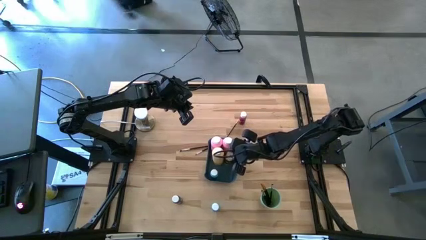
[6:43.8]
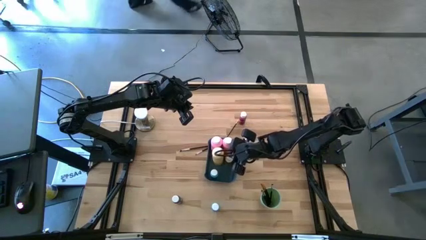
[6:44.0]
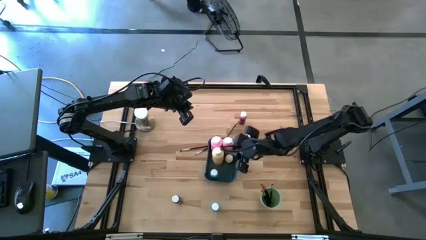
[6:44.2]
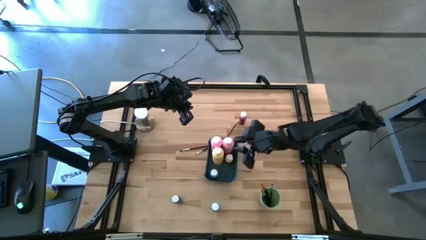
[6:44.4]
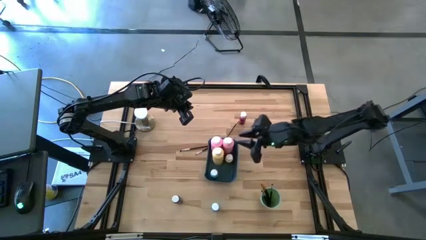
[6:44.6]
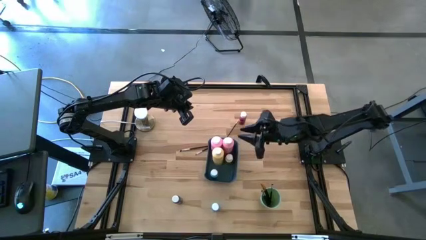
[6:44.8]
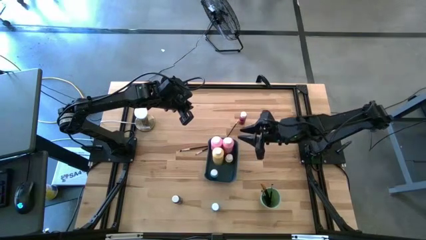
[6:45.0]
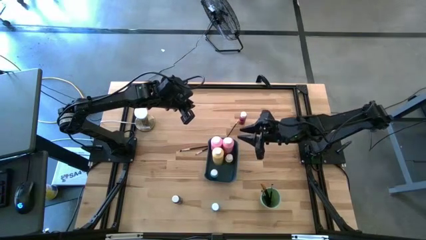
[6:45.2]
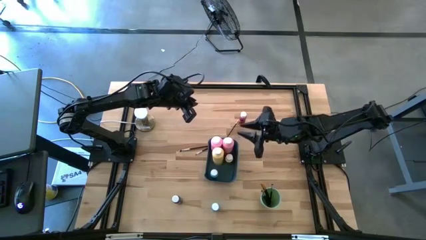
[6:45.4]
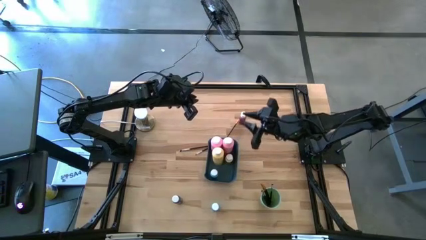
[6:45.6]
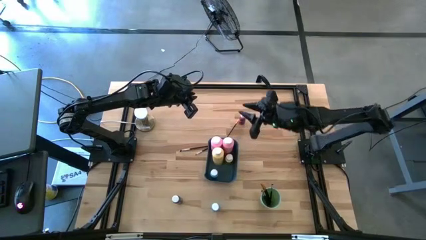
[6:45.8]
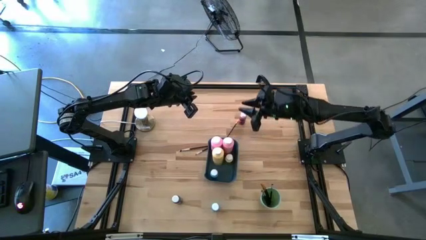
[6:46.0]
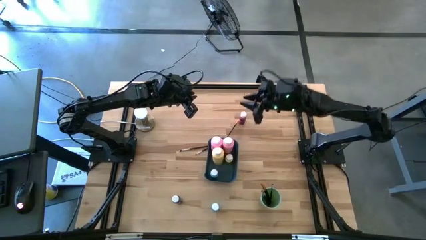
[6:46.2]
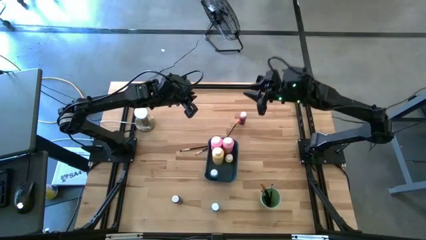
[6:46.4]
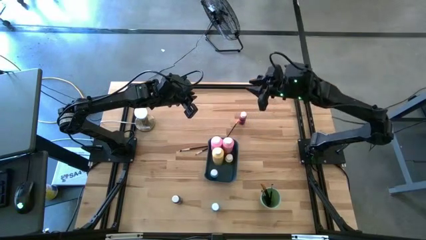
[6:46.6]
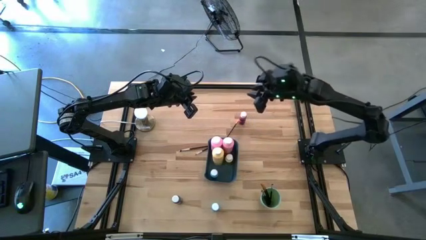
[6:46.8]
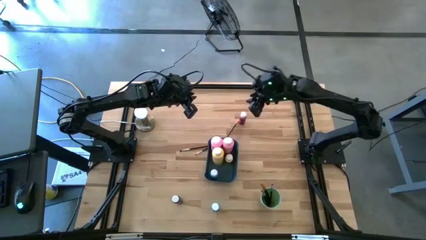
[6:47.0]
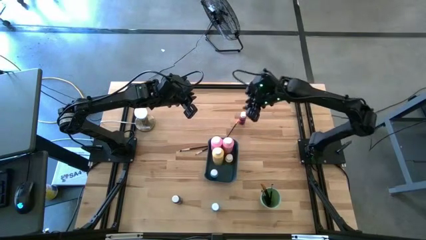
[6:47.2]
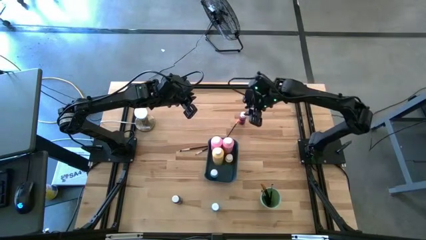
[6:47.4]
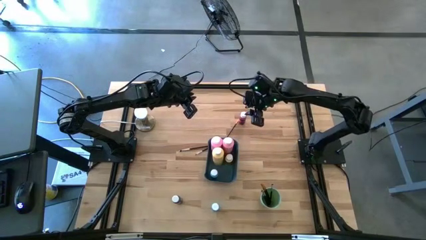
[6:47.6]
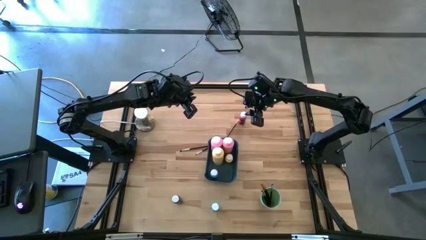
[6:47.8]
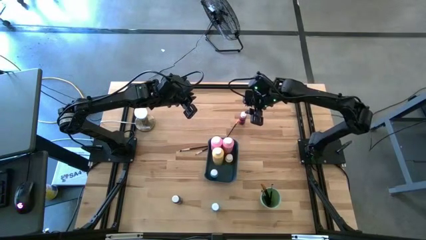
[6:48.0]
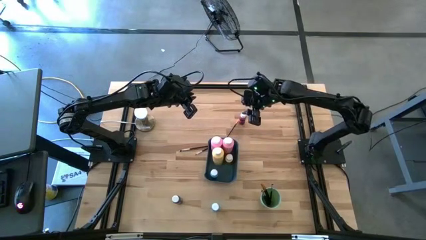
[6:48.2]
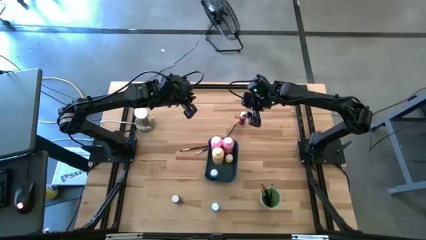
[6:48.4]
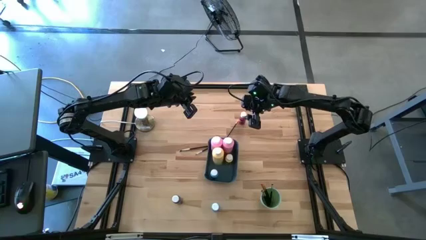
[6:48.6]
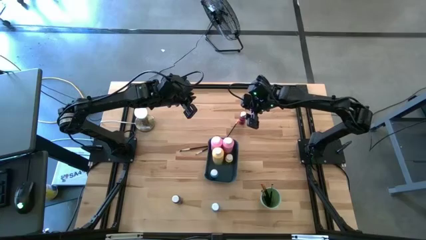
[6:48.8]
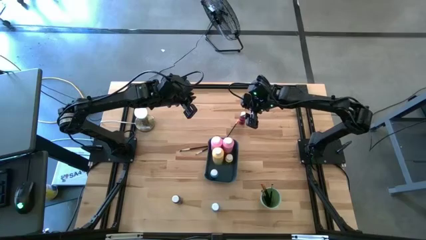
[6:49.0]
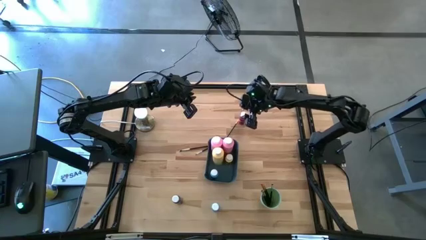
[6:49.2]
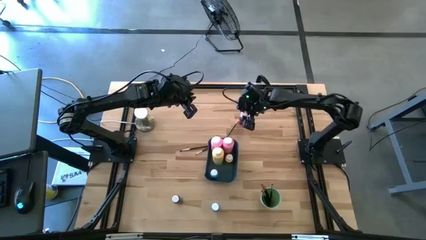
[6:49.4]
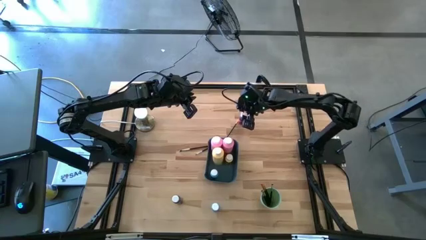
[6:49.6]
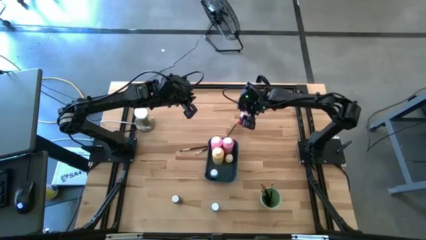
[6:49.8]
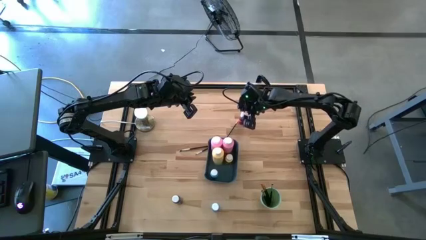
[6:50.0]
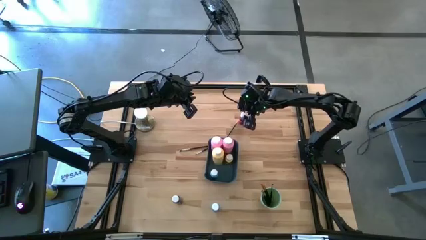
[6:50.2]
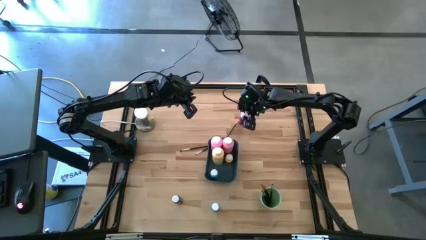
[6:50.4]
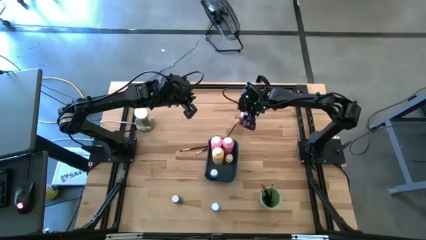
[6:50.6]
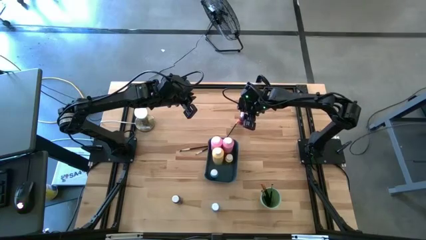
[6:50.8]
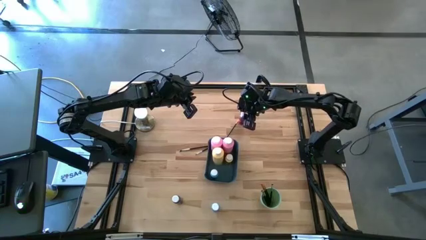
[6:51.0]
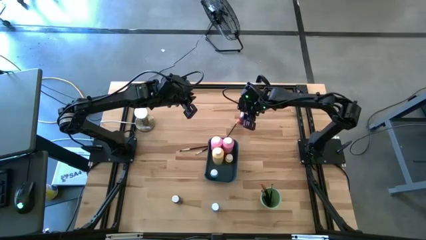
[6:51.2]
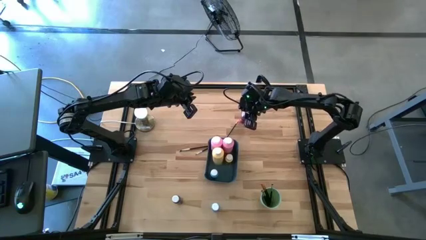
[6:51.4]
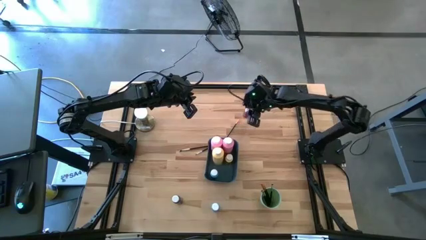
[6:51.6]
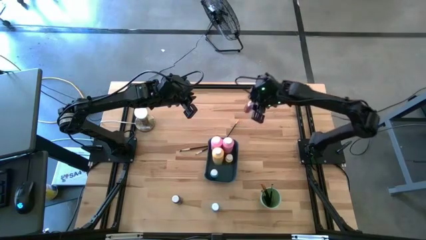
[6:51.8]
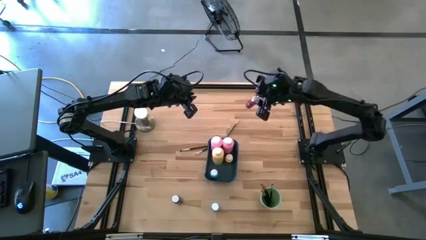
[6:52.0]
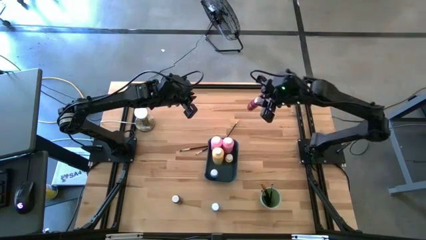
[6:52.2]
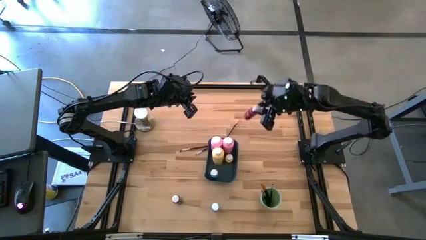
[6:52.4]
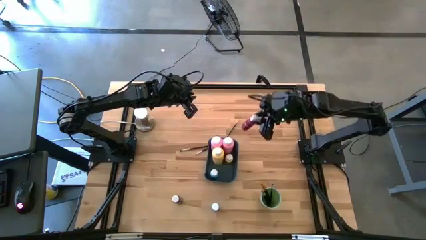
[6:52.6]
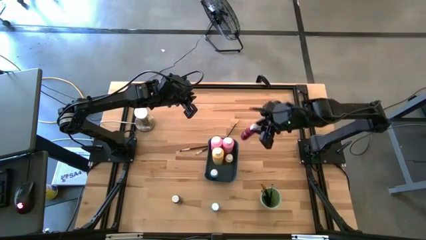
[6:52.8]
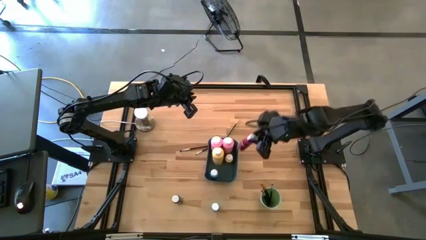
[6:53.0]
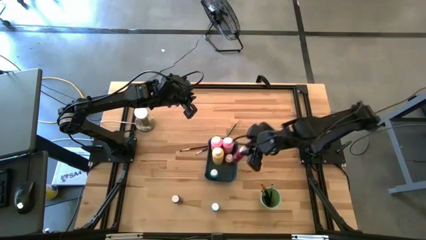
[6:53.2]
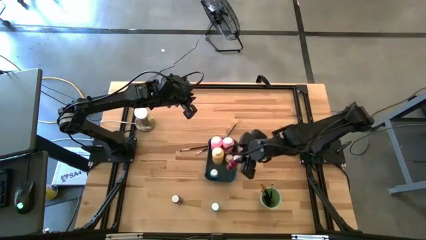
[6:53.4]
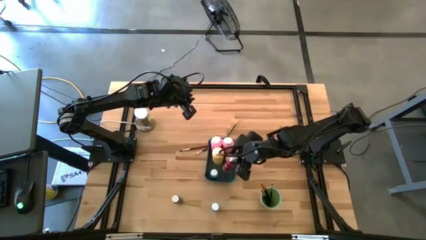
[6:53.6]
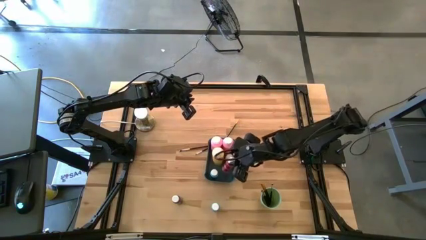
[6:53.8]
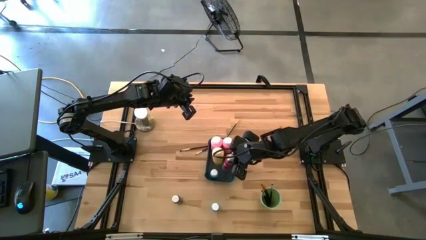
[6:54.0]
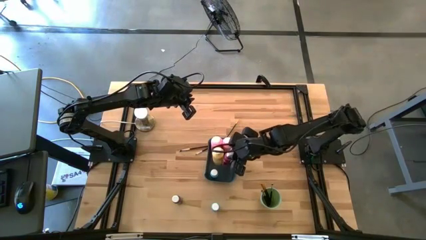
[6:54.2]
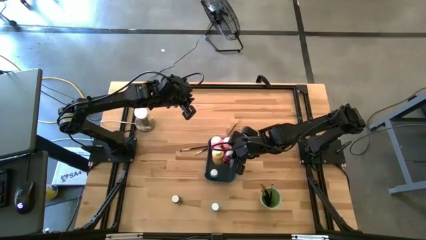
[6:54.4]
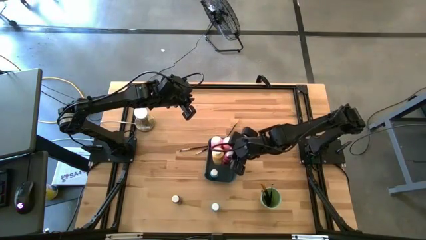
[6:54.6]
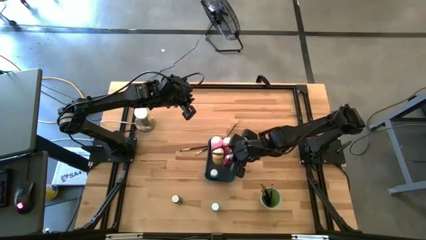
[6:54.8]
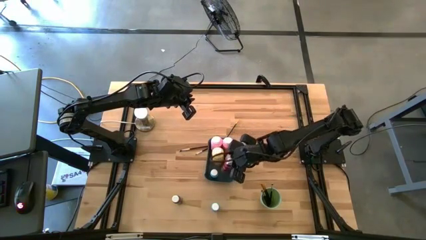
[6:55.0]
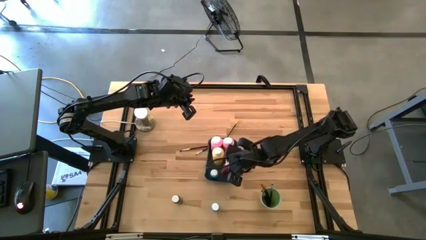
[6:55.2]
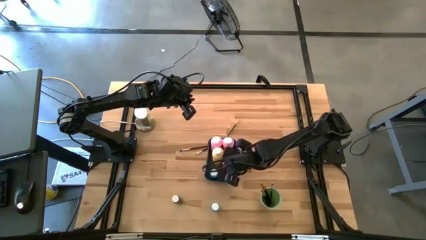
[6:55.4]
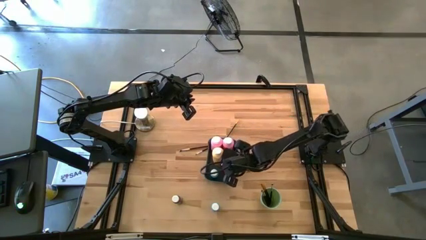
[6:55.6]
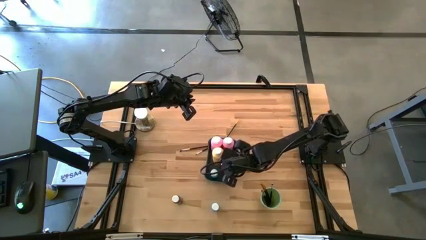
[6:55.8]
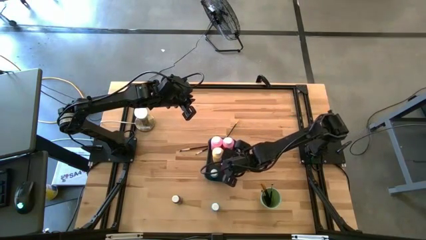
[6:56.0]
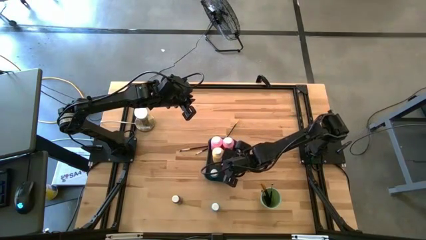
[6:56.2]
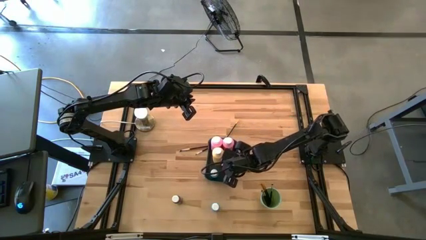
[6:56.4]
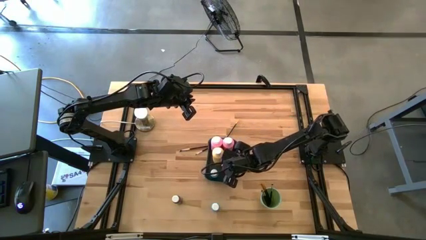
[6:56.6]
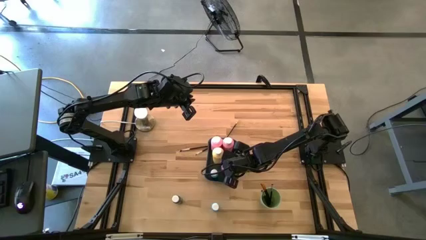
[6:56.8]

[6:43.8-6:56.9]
Task: Pick & Place Paint Supplies
Put the small pink and black paint bottle into the blue bin

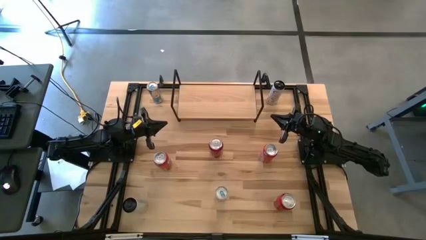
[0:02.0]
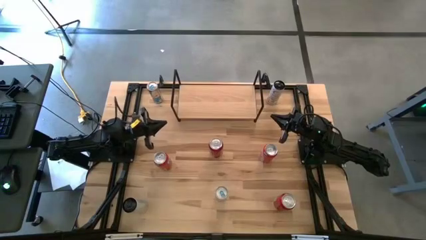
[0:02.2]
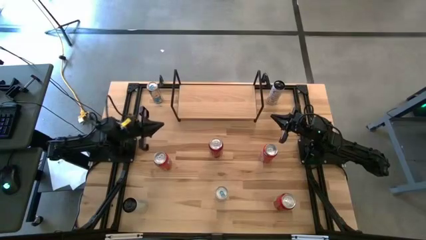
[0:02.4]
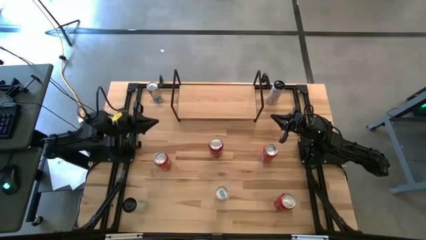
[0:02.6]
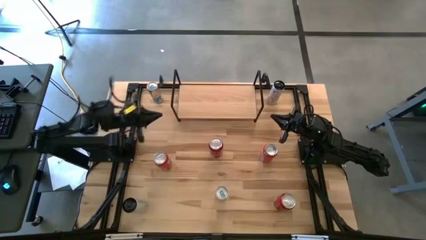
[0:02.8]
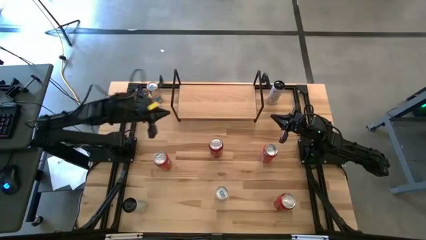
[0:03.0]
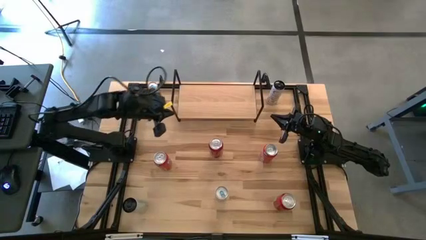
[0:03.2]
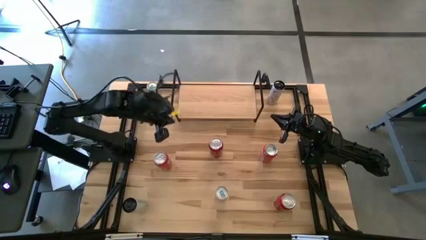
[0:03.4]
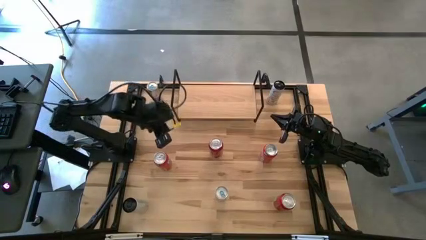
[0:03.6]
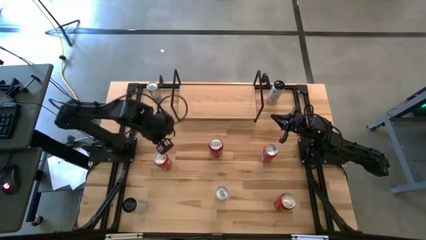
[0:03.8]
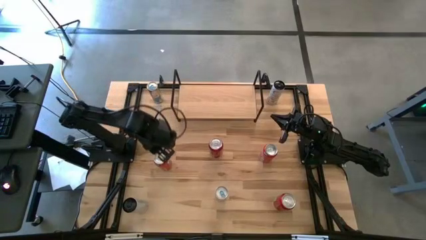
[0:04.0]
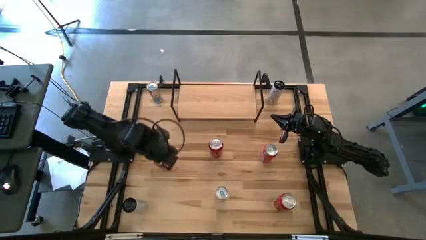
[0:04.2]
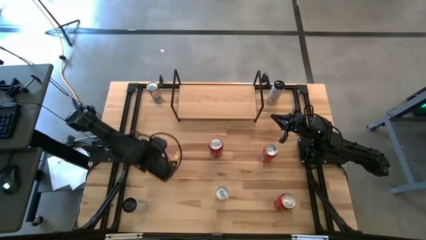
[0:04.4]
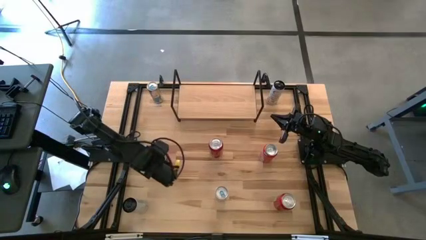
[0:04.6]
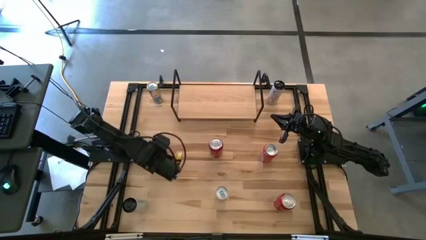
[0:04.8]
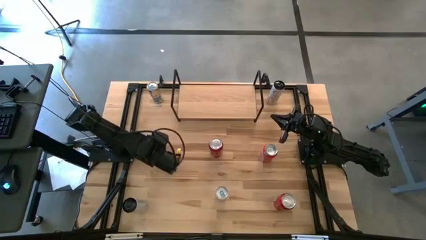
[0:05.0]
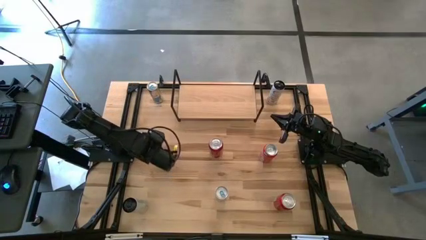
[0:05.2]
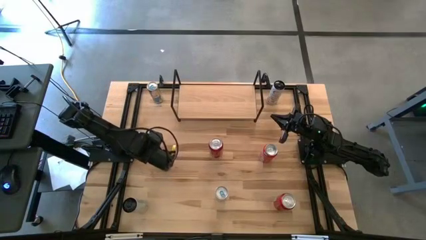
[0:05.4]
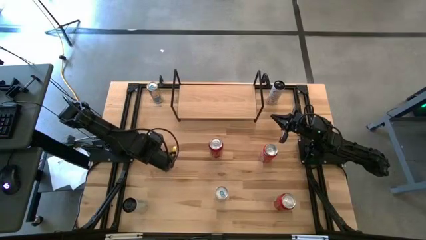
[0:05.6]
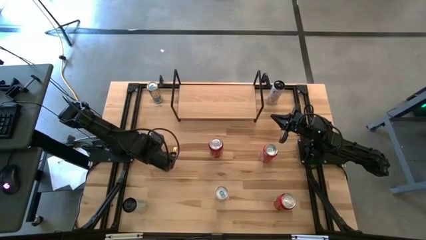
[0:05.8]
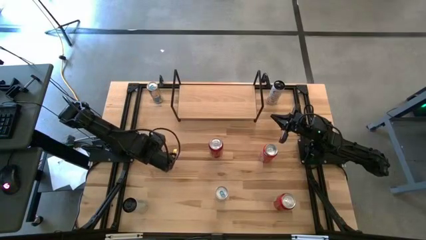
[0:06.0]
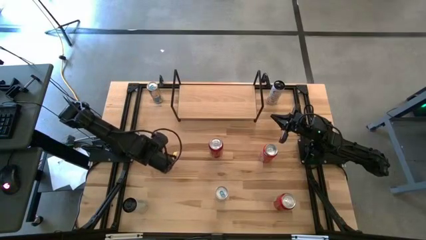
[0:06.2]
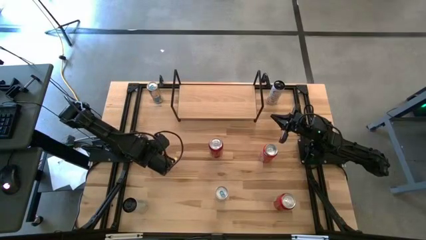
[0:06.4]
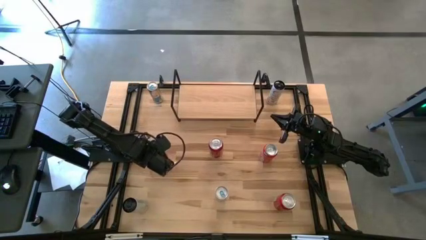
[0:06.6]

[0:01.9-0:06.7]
Task: Place canned beverage on shelf
Put the left red soda can on the shelf
